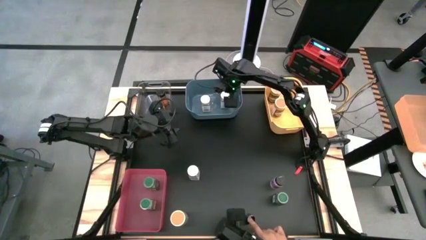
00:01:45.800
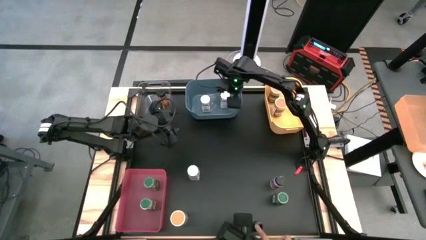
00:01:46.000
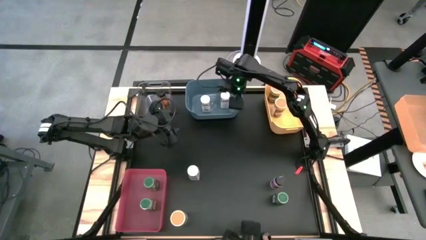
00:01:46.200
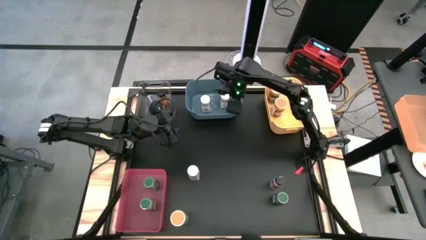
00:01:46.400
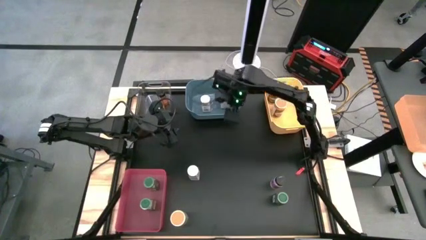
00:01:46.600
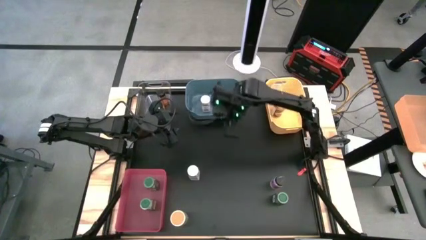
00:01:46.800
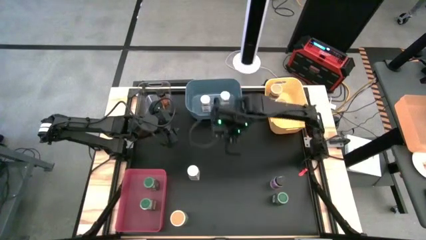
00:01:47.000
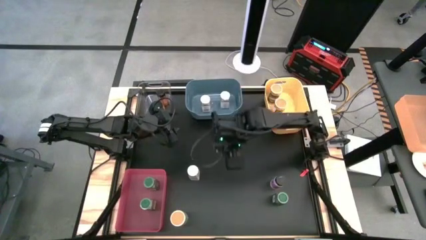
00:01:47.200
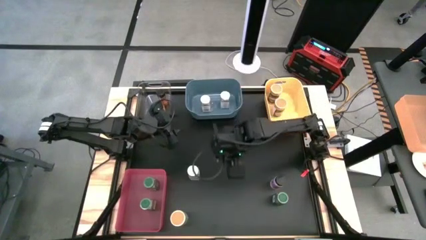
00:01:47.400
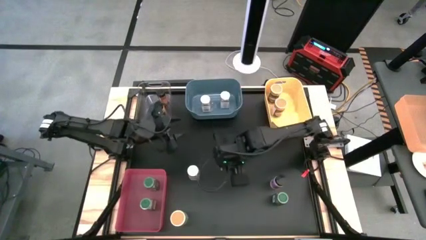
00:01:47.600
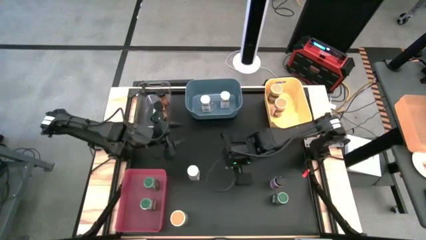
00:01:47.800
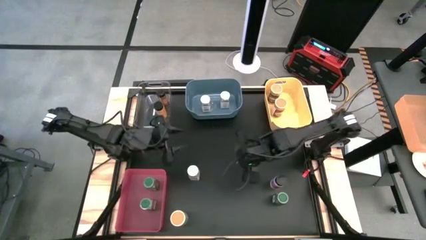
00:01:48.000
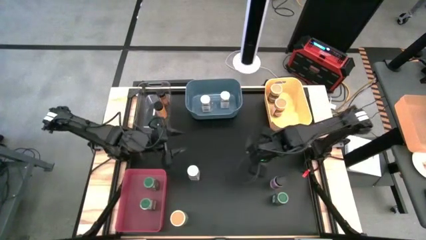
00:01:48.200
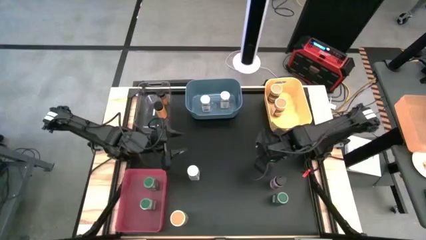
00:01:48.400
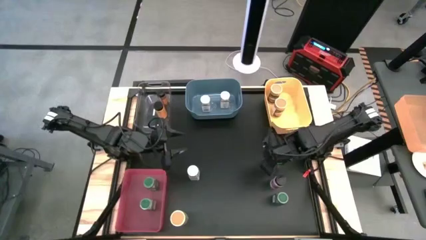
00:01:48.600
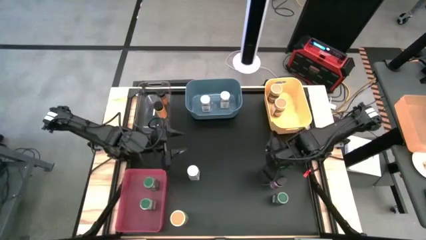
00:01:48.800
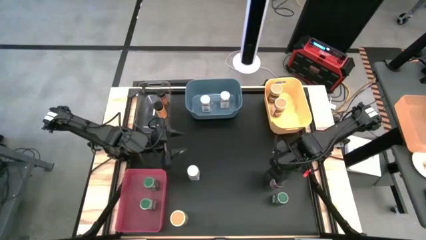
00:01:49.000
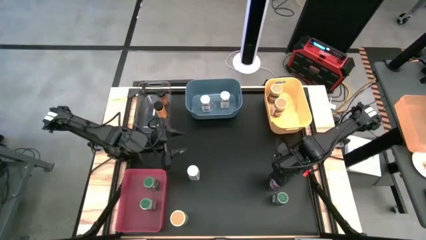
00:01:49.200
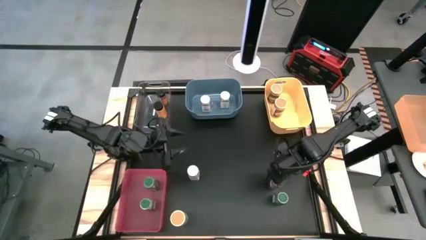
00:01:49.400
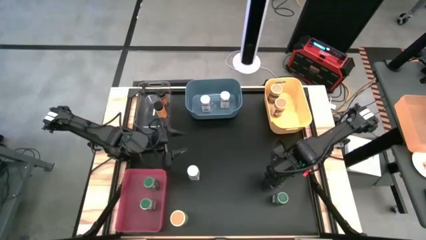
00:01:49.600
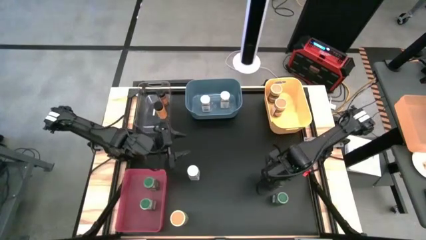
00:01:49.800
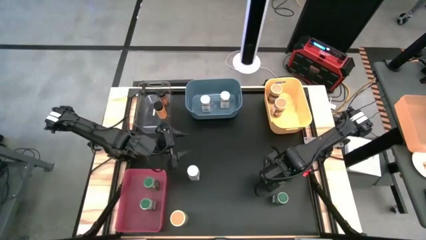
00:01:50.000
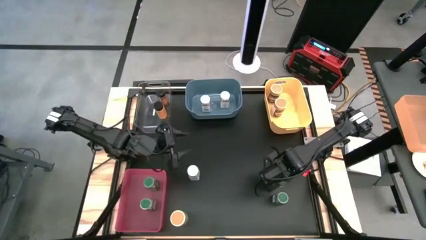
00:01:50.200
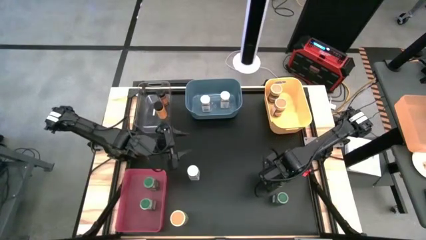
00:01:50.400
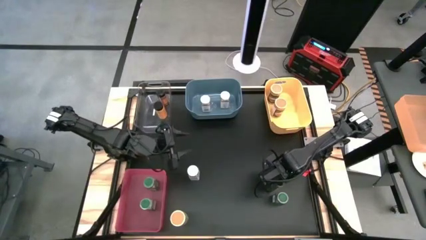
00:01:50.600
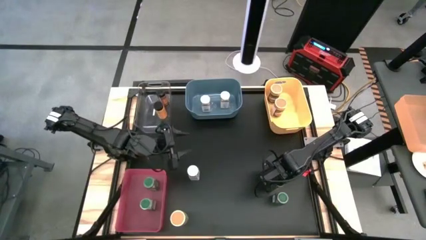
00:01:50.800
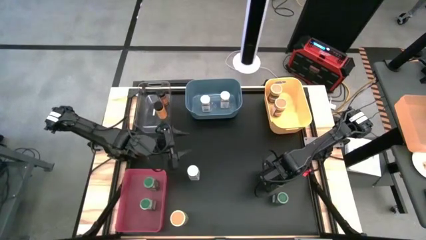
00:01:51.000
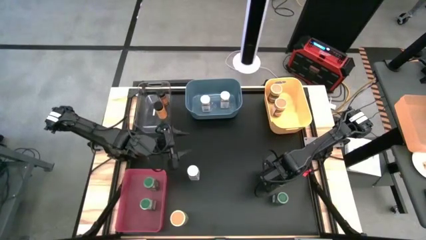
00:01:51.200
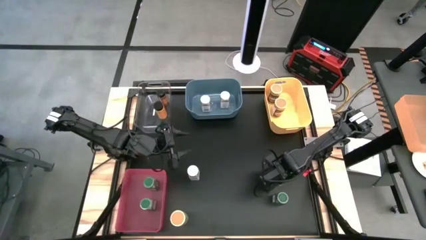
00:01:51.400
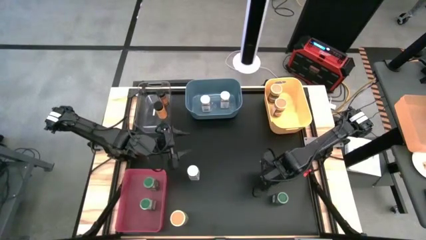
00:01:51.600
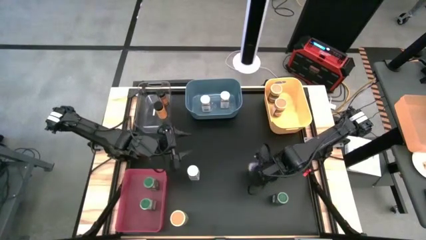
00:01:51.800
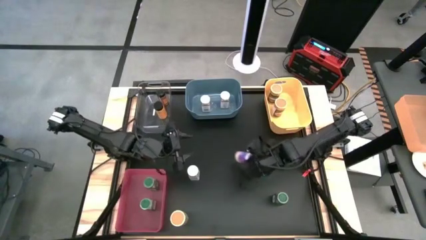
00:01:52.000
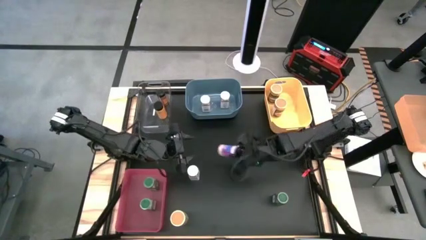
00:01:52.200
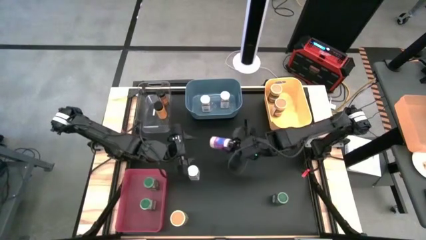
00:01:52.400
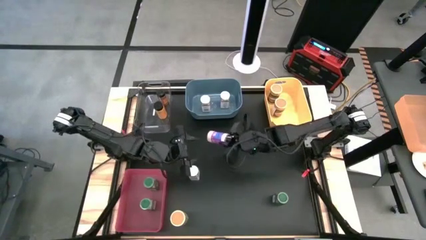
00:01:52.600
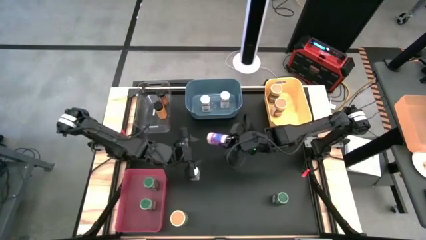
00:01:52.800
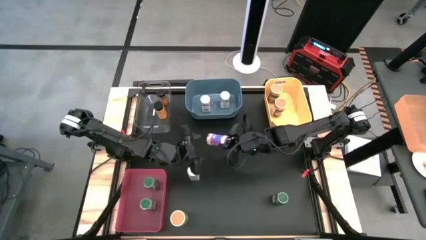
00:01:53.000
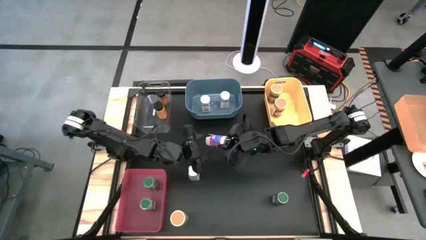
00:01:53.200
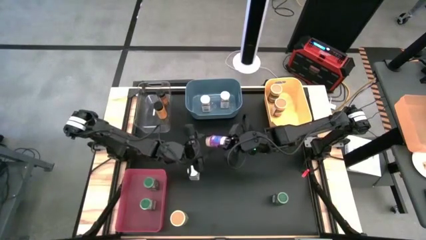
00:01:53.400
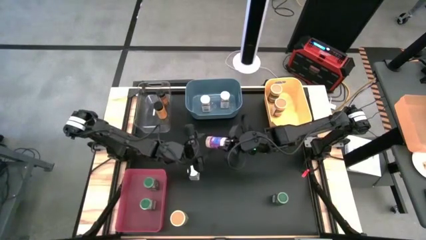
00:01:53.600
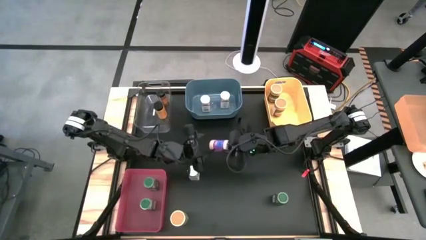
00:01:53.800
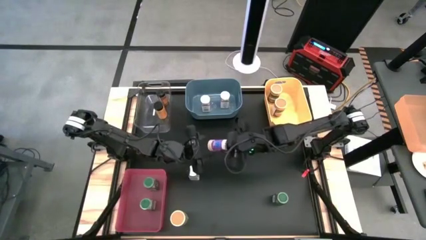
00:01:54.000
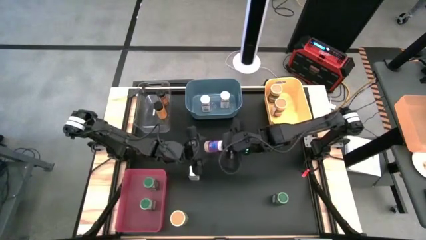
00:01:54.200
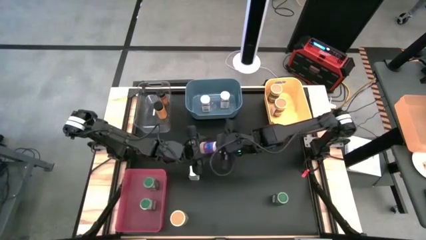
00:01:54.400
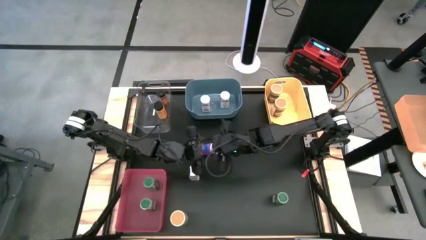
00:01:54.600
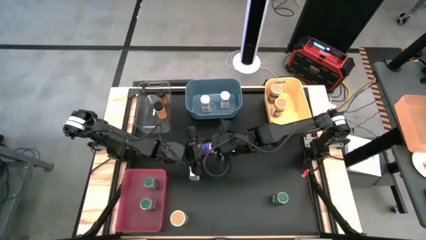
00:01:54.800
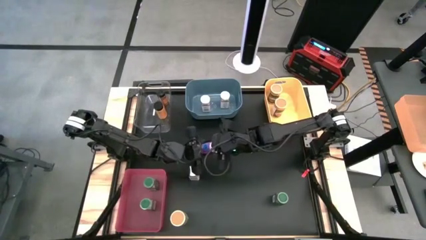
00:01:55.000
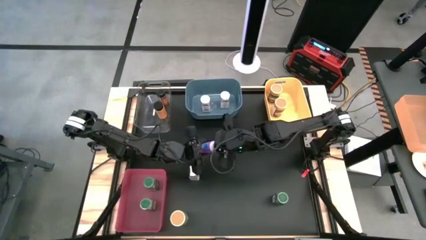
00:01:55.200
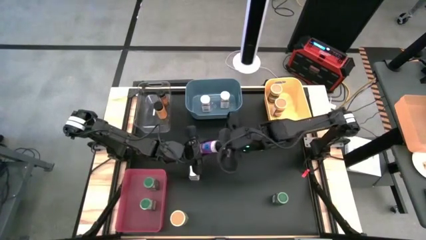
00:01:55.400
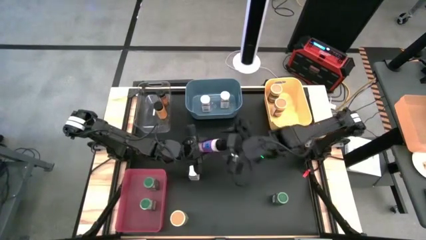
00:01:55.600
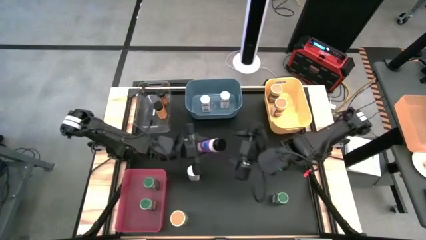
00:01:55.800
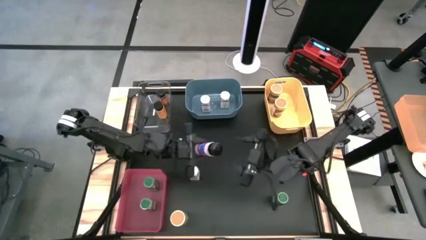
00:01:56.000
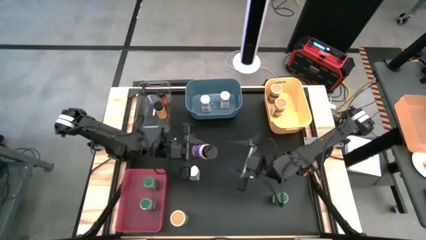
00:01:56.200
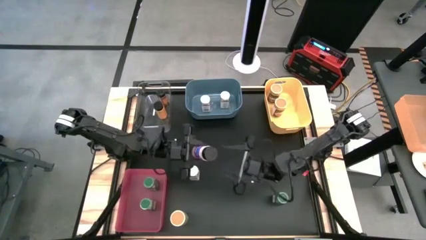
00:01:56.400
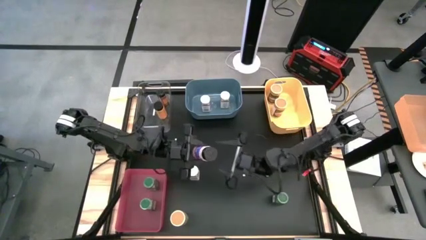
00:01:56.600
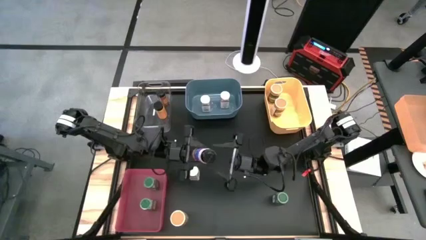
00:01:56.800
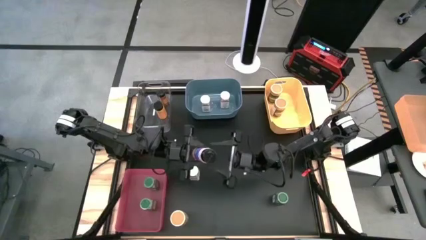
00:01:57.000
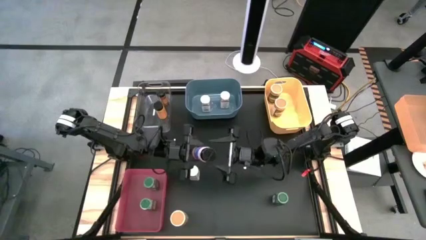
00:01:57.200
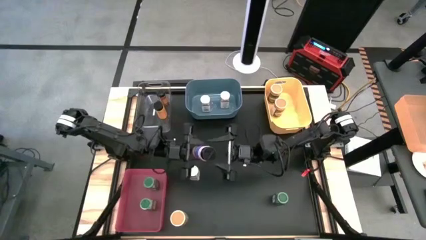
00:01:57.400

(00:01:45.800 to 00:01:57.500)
Task: Sort spices by type
Put the black seasoning bottle into the transparent bin

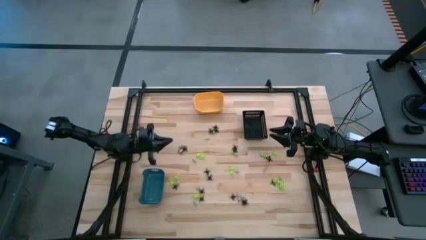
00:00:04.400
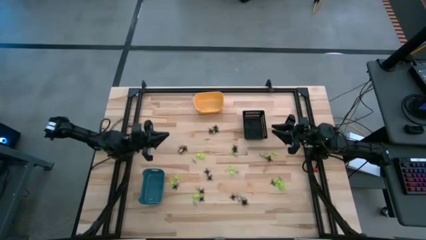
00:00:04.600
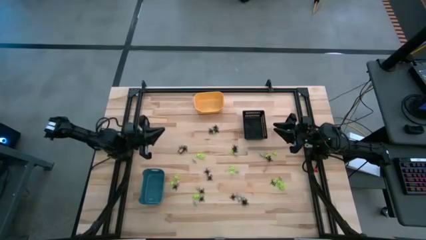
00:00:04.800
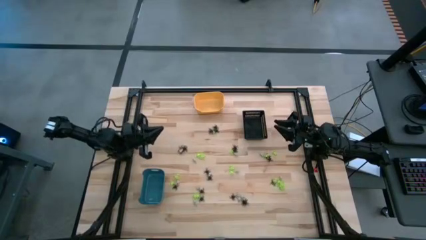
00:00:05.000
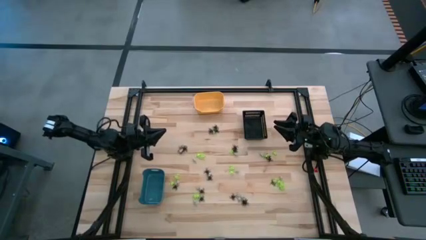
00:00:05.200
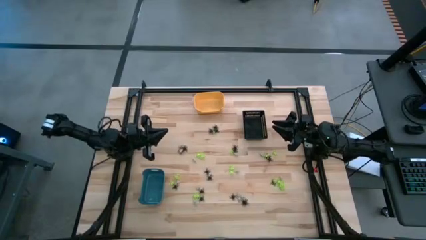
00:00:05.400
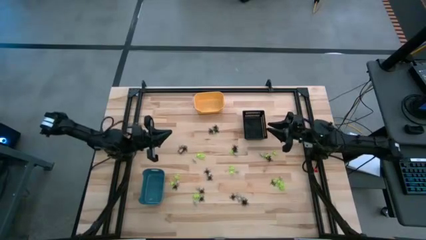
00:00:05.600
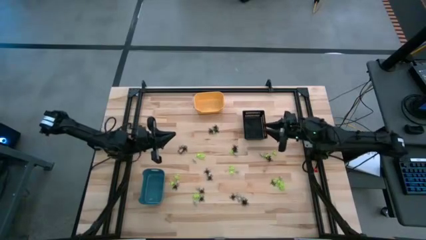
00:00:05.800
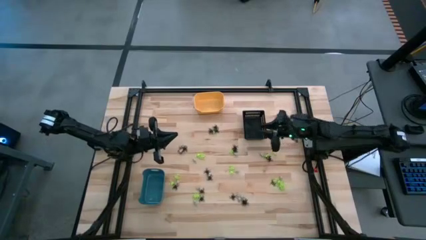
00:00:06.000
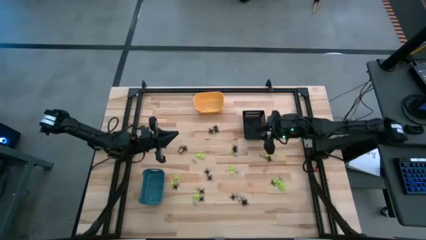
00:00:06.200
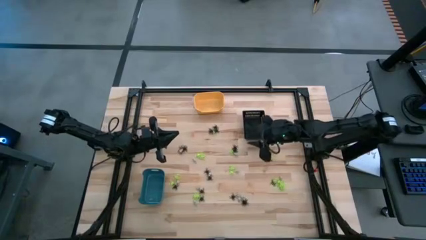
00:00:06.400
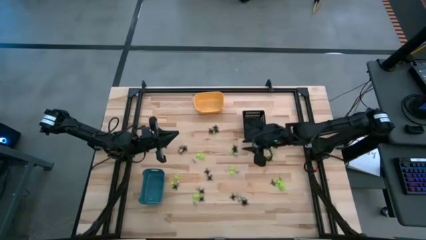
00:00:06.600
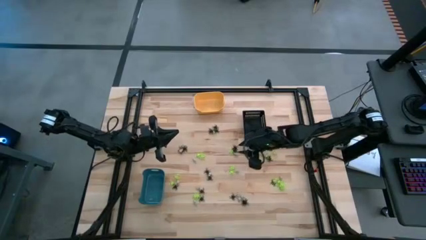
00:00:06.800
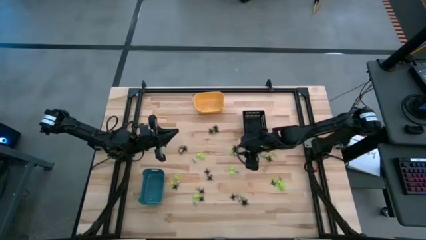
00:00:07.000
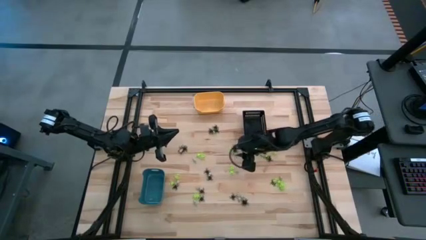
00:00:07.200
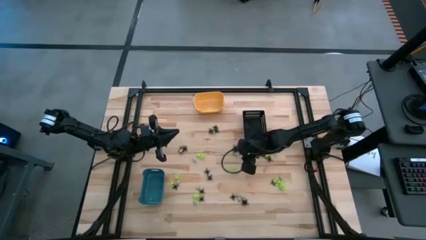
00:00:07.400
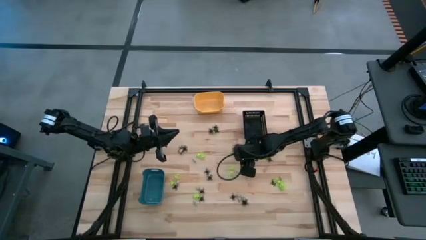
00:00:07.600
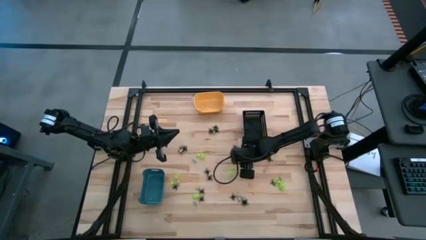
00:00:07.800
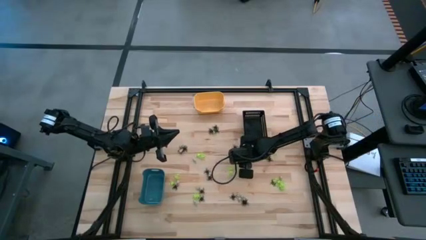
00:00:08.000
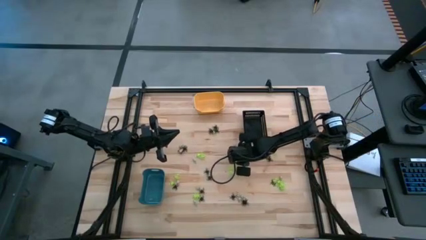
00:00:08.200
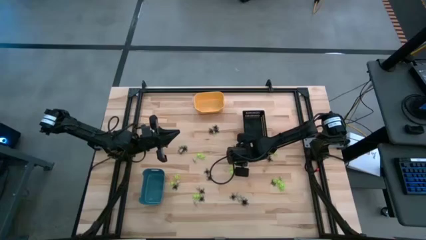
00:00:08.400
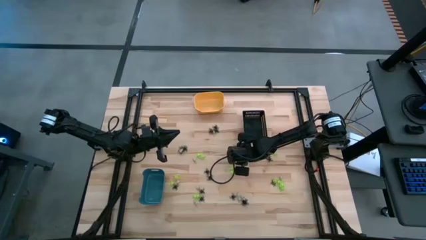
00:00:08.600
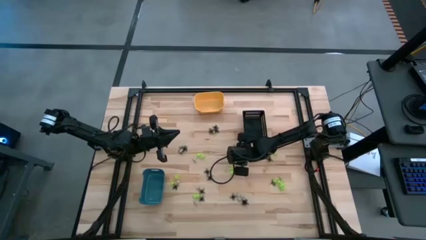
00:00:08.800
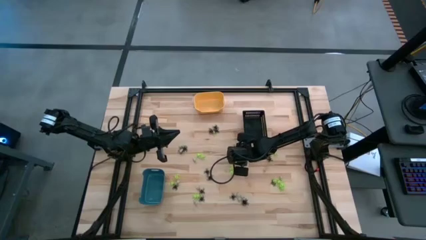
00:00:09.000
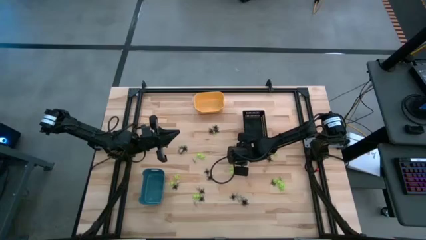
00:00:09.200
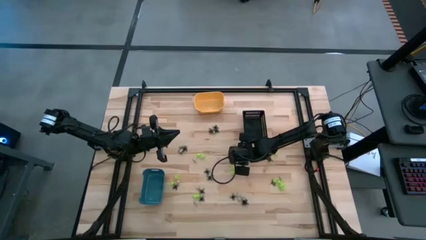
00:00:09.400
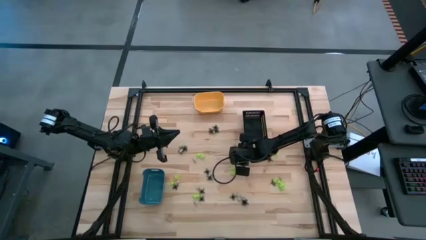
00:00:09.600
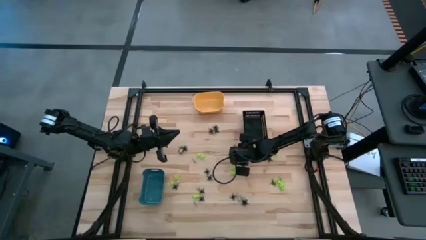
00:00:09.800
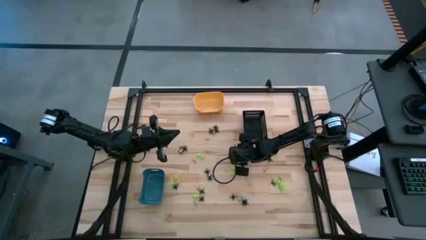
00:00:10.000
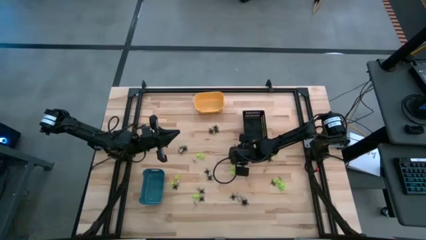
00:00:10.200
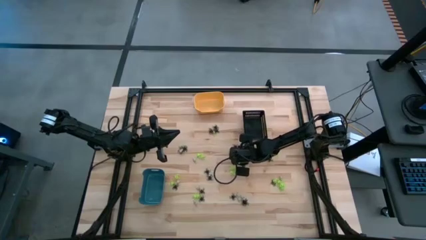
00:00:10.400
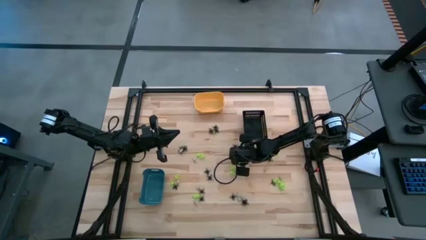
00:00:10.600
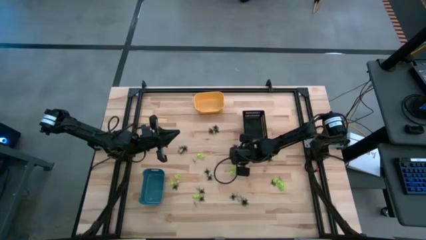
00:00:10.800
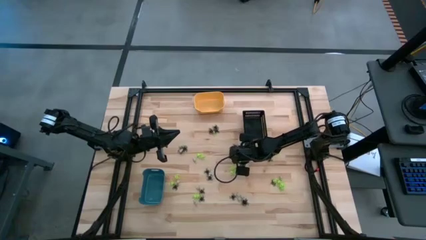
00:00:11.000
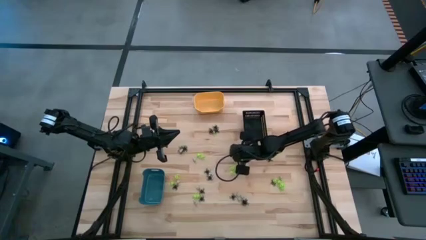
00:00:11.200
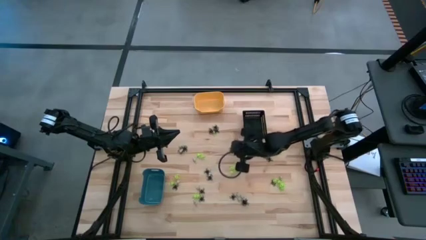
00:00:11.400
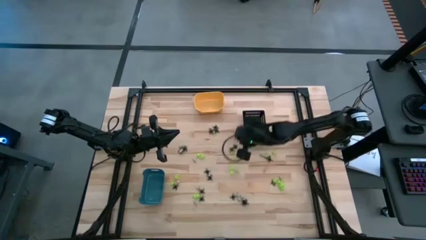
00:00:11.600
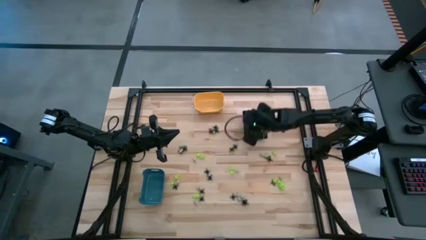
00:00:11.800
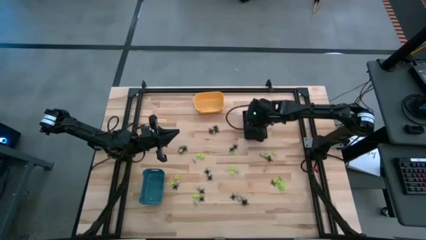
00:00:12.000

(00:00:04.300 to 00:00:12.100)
Task: Sort Halloween decoration
Put the white skull toy into the black bin
